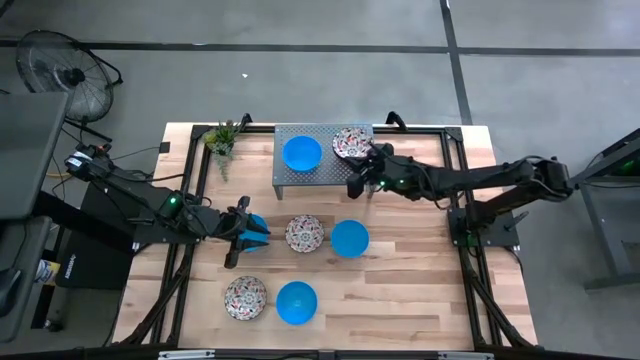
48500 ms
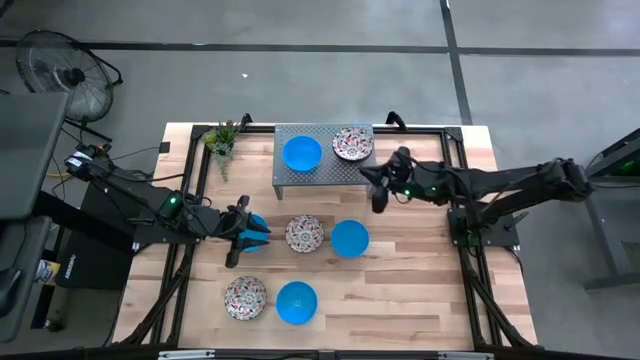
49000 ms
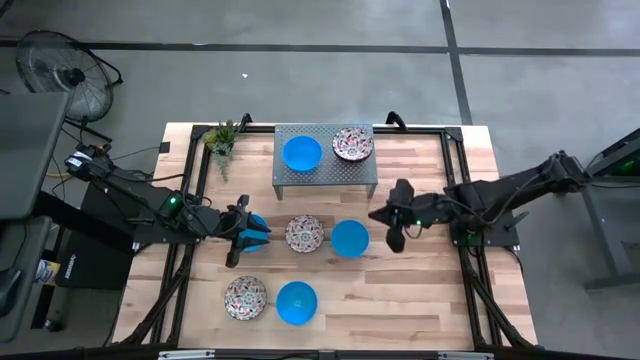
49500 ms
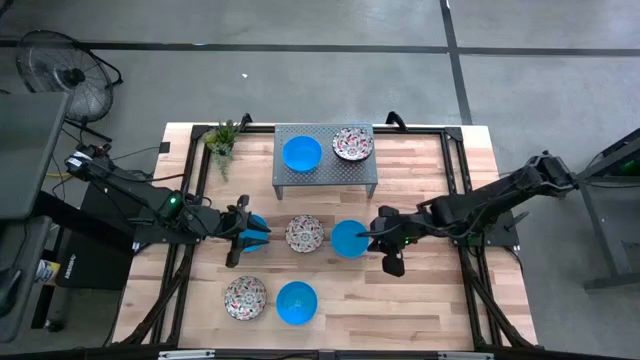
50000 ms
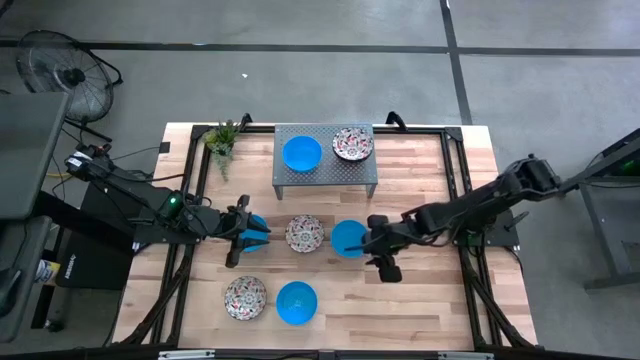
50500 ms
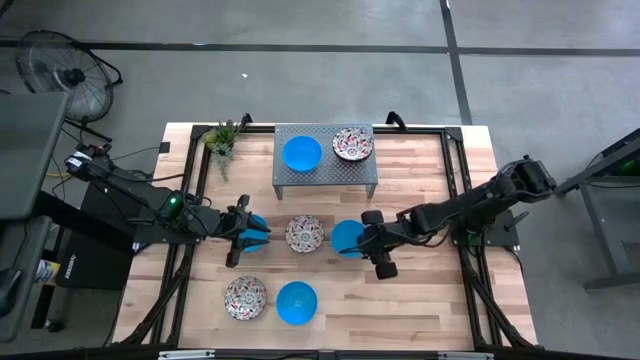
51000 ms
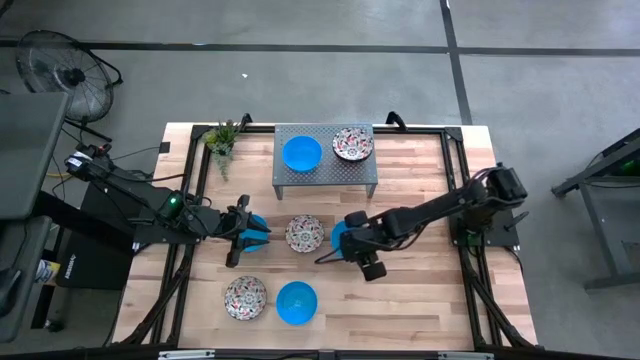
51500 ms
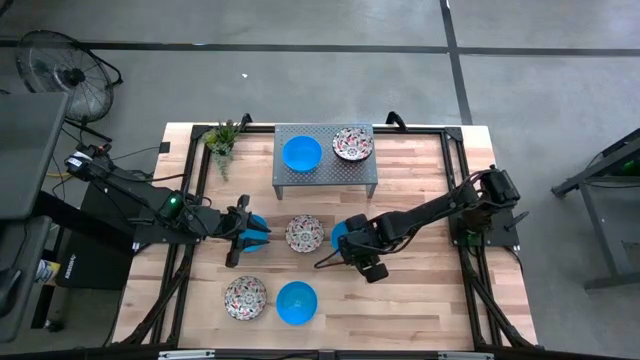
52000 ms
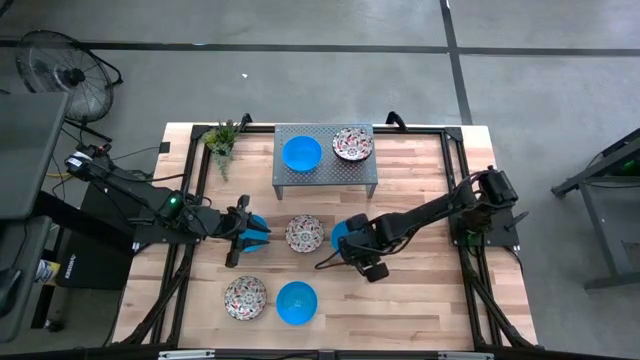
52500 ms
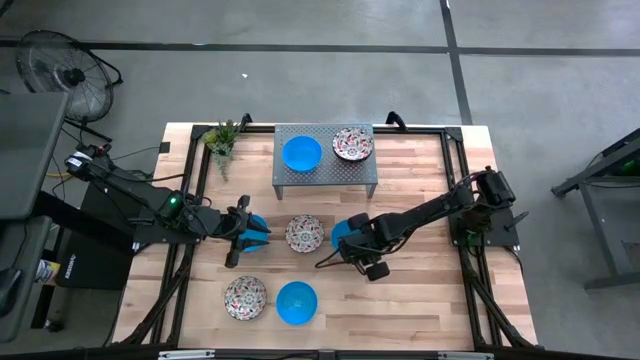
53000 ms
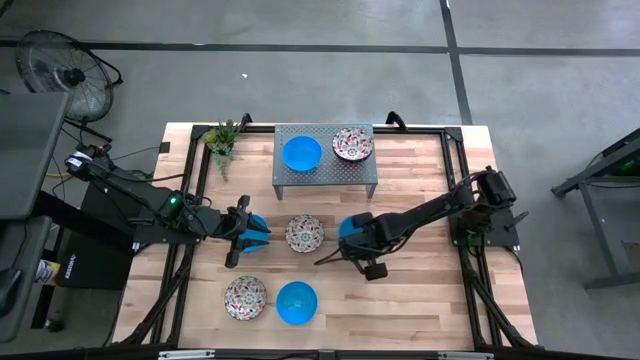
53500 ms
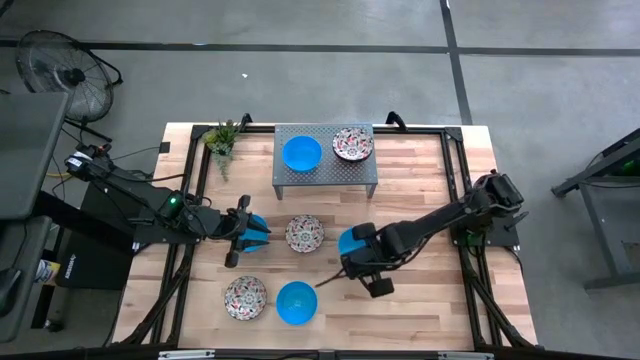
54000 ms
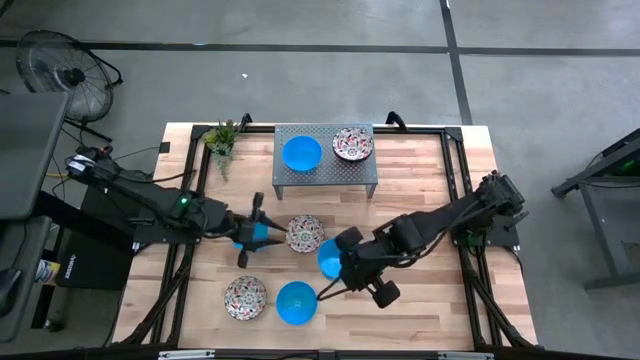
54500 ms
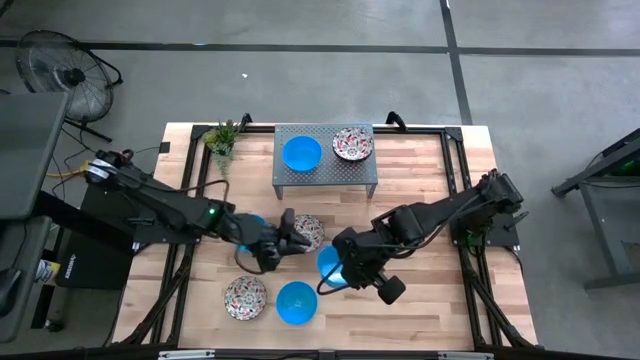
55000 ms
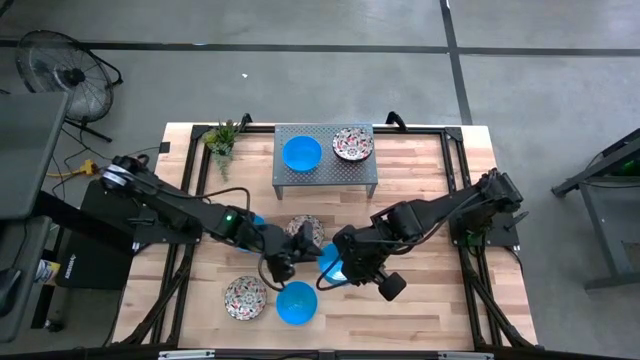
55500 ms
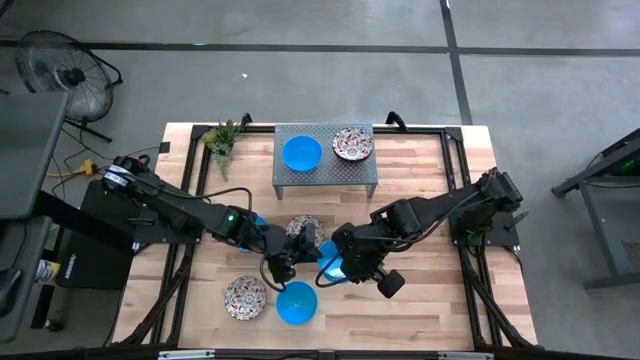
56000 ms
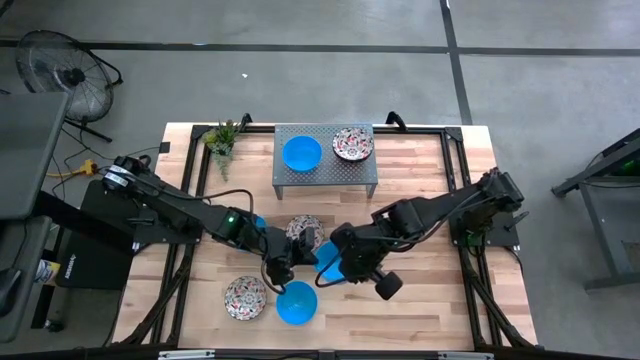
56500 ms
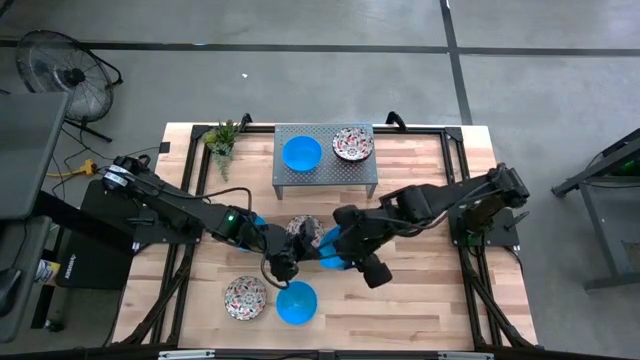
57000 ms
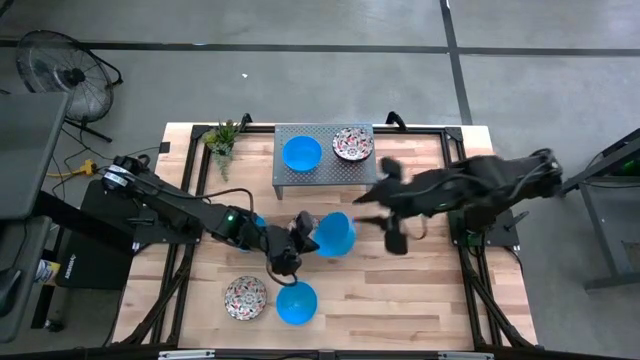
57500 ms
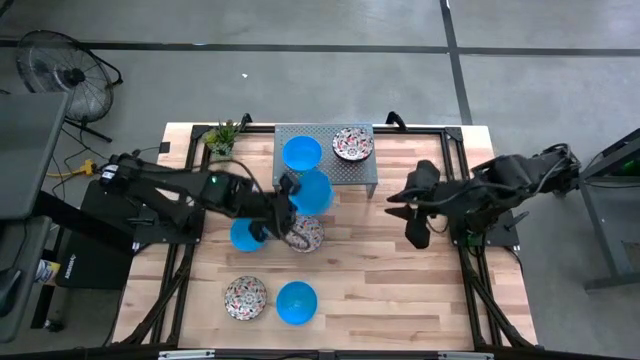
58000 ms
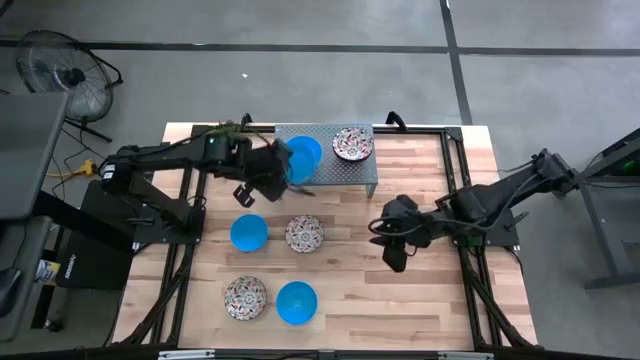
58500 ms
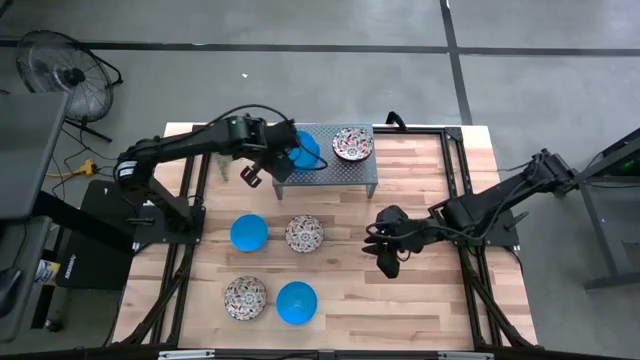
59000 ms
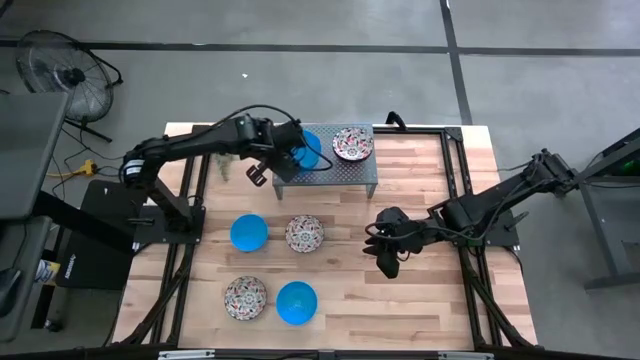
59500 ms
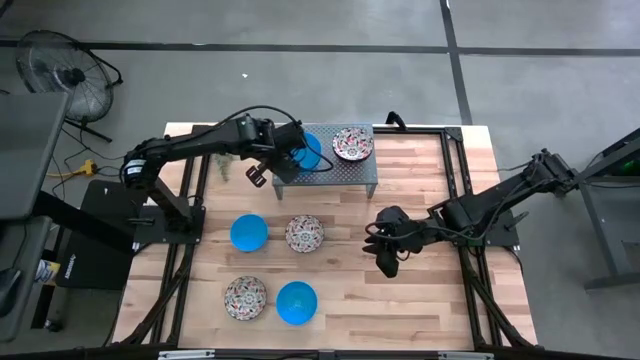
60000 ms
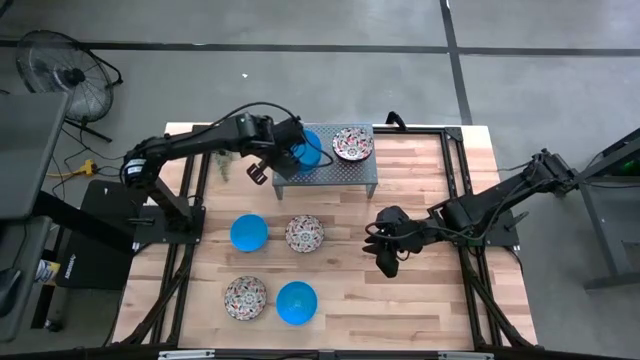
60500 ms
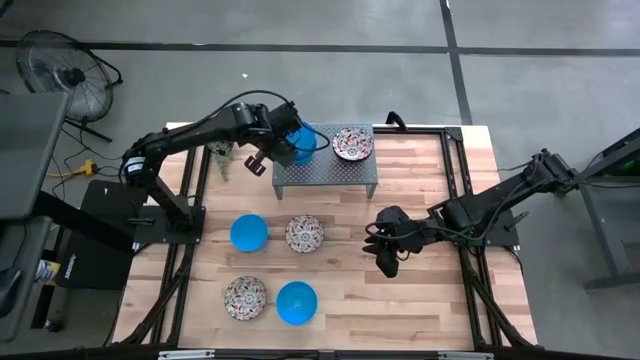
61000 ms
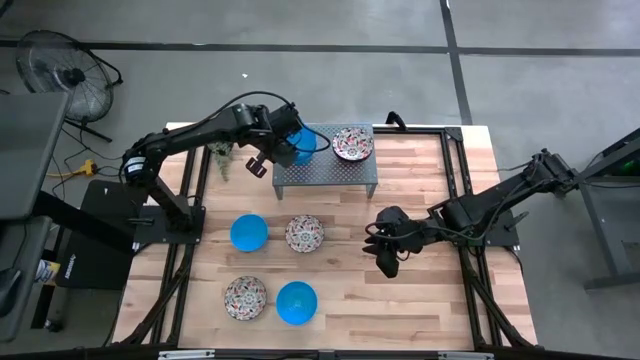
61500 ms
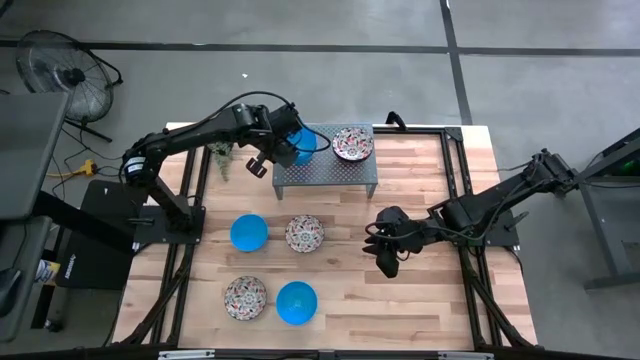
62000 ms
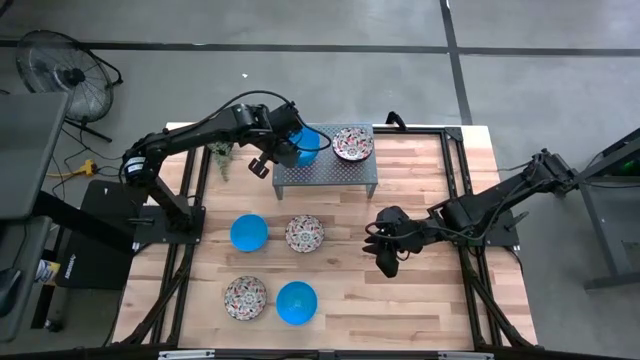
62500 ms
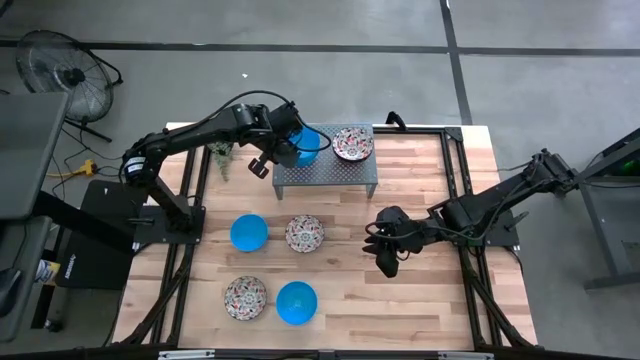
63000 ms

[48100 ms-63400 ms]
Task: Pick & Place Mini bowls
Stack the blue bowl on top of the other blue bowl on the shelf

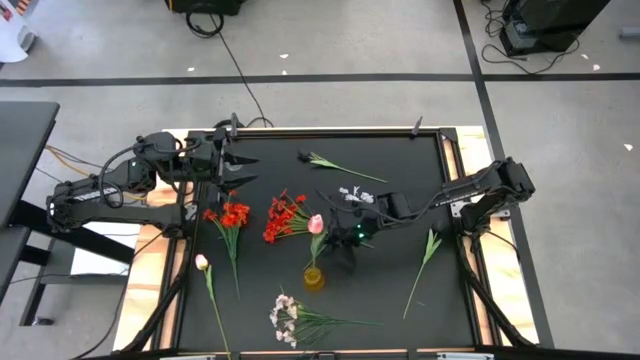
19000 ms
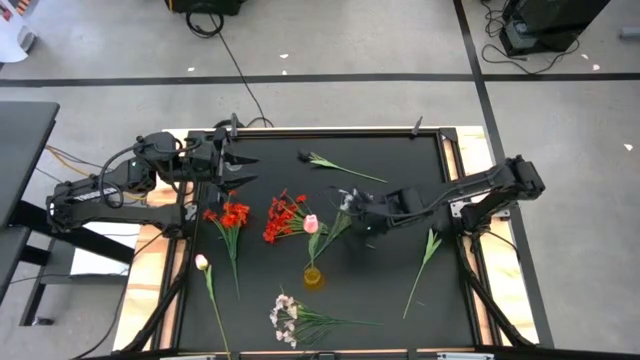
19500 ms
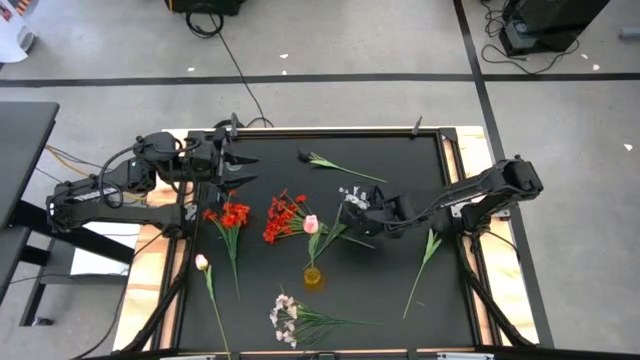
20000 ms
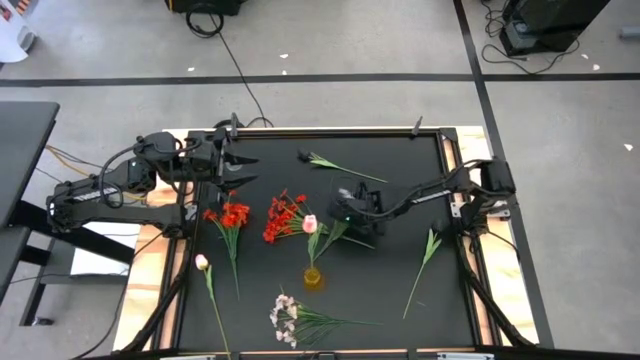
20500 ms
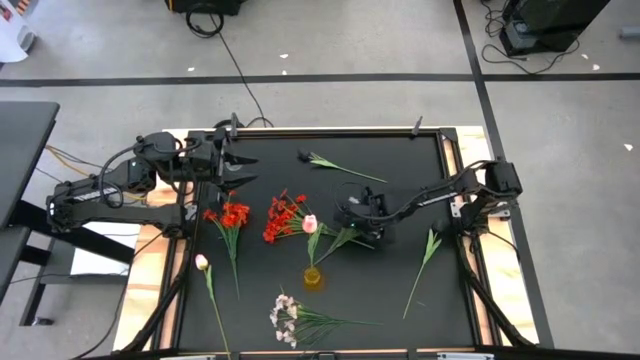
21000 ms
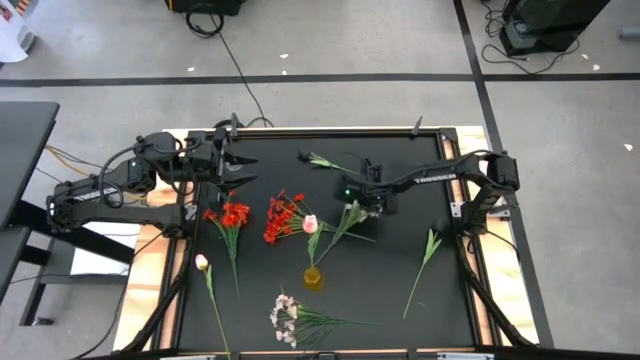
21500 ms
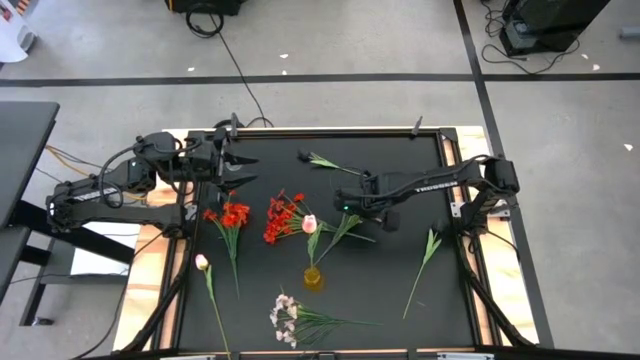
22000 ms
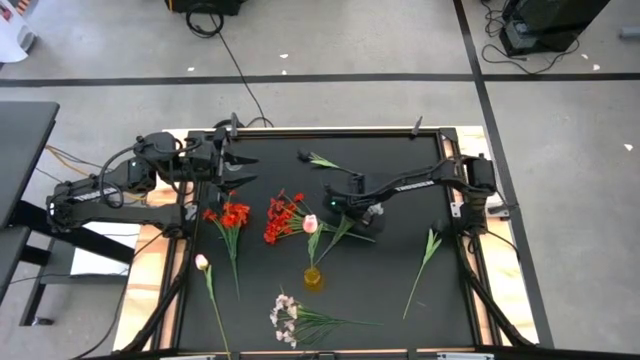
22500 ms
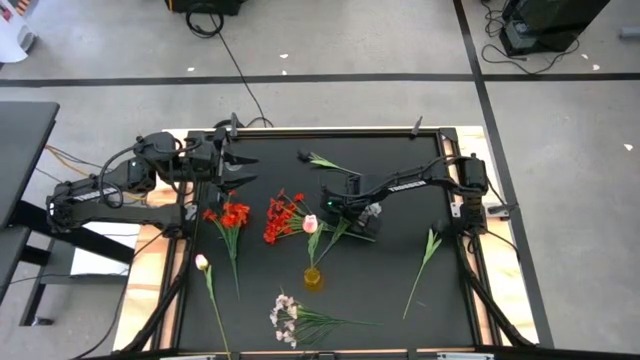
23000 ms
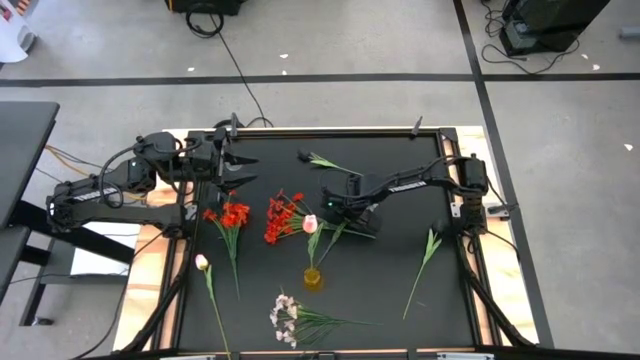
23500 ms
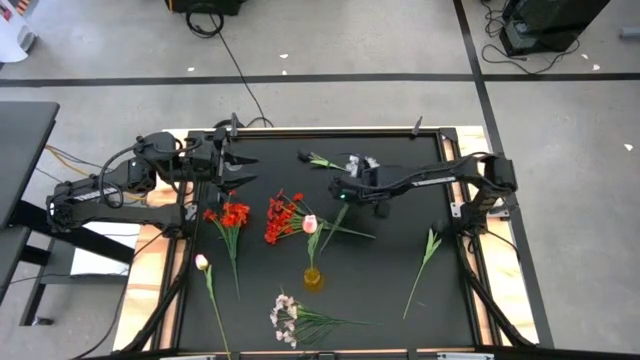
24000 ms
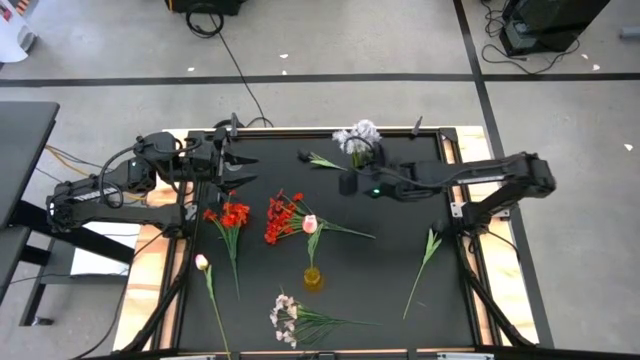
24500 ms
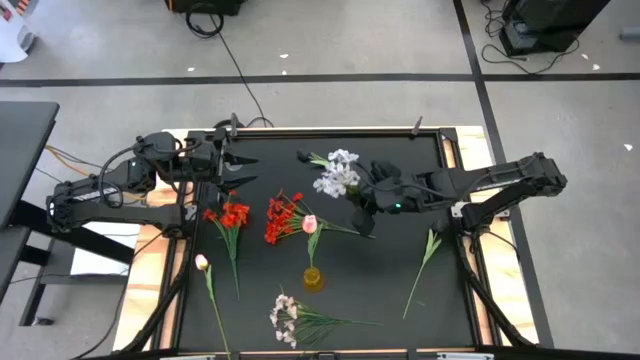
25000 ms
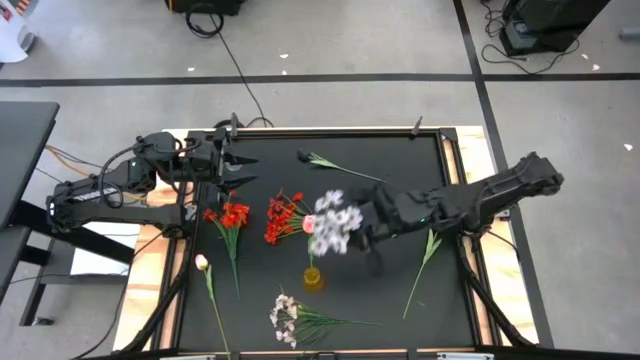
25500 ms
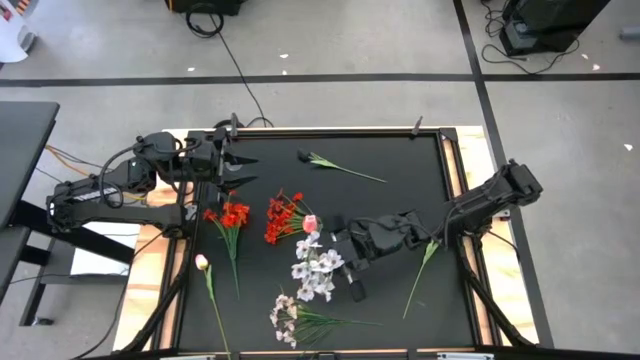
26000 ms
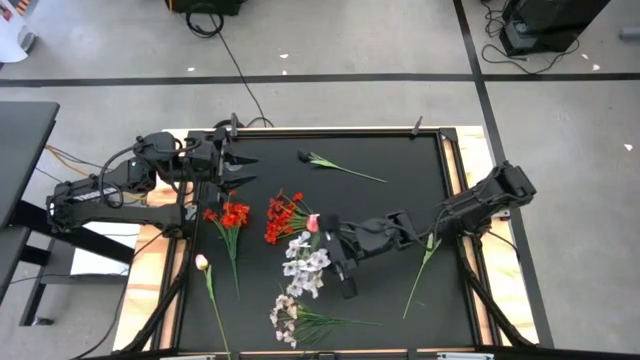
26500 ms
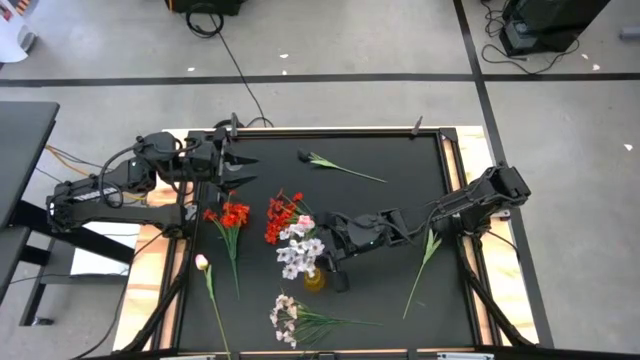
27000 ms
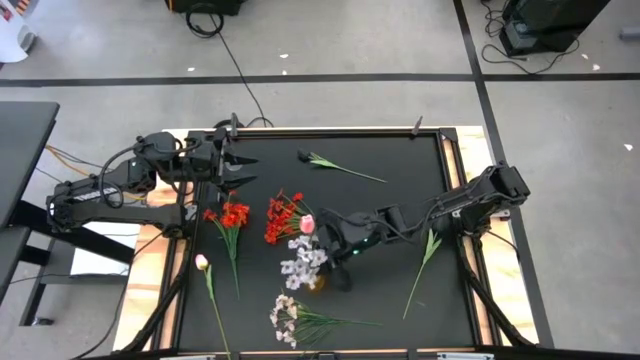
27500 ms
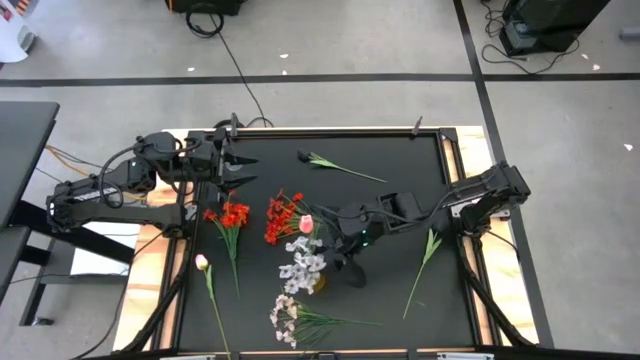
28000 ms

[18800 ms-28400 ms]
Task: Sort flowers into vase by color
Put the top white flowers into the yellow vase
